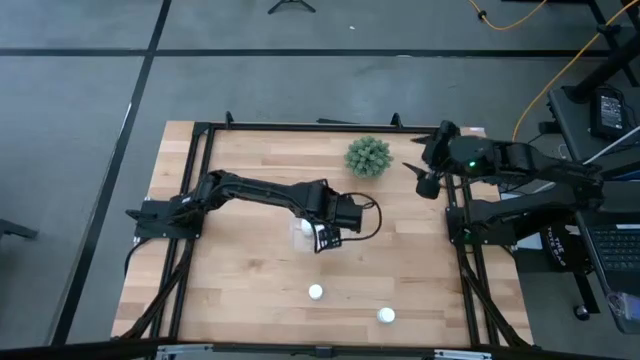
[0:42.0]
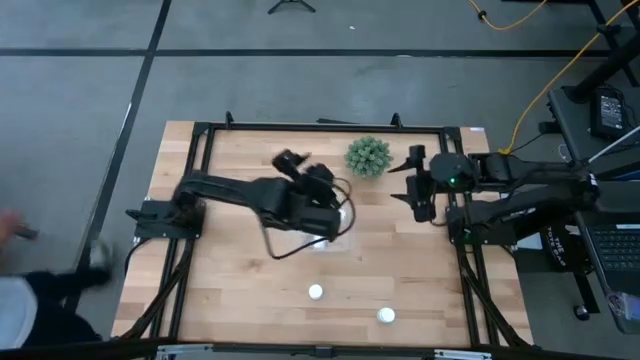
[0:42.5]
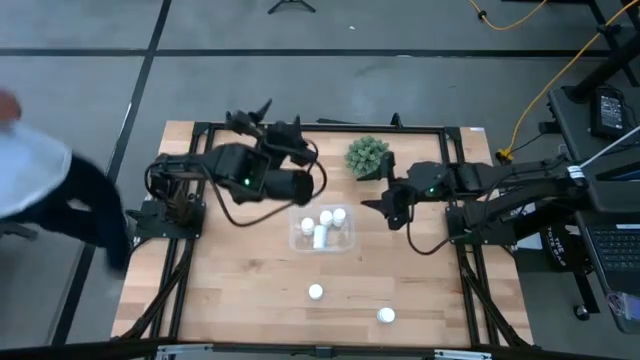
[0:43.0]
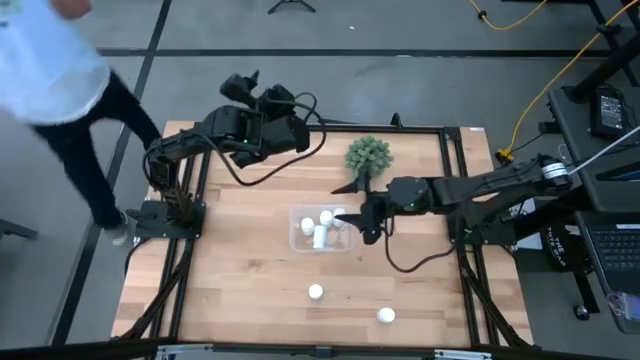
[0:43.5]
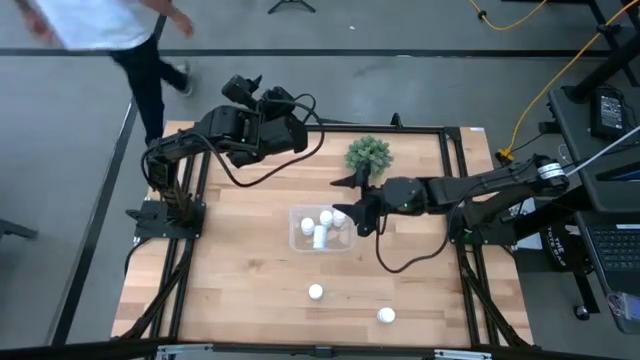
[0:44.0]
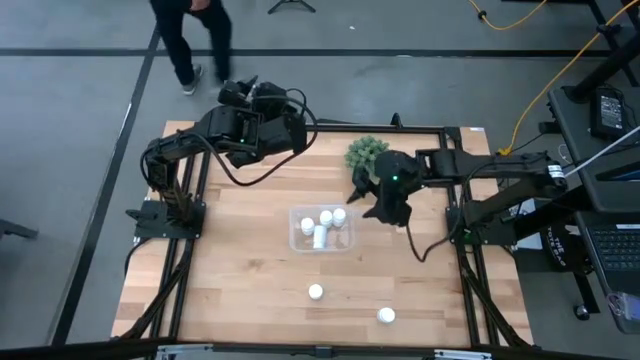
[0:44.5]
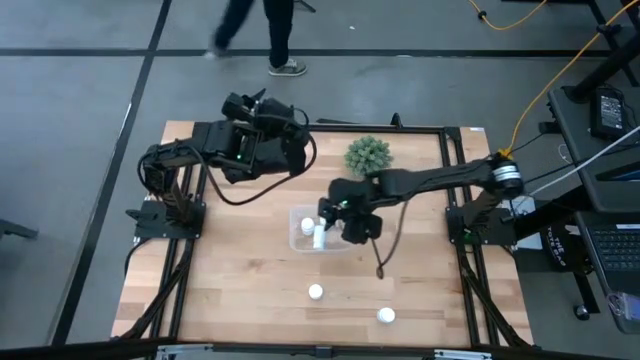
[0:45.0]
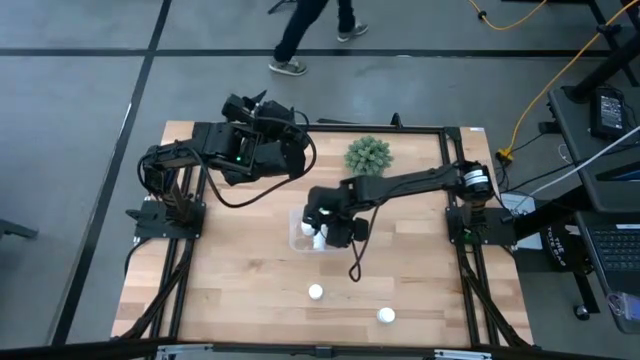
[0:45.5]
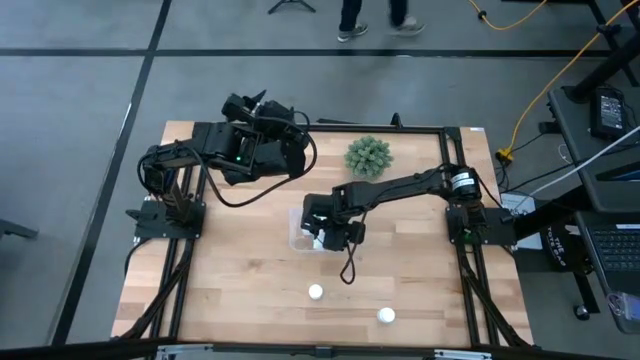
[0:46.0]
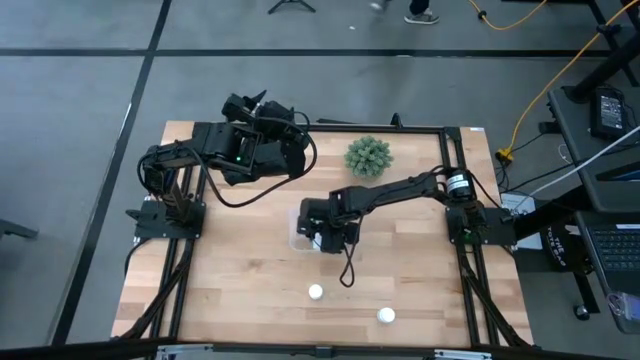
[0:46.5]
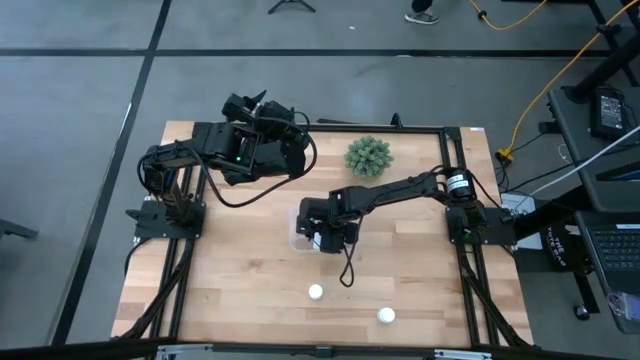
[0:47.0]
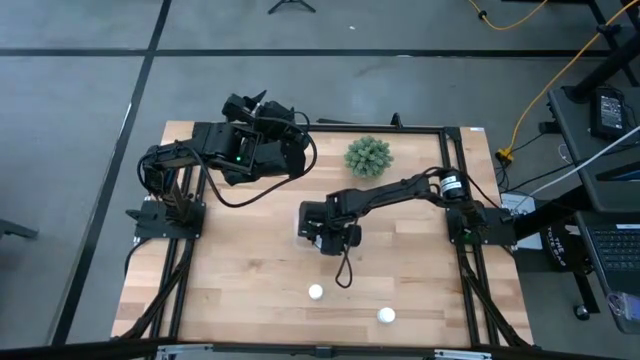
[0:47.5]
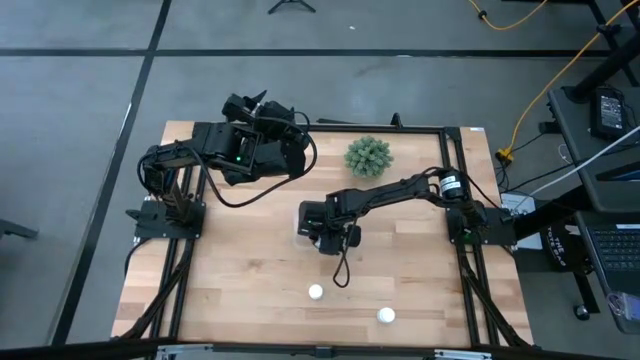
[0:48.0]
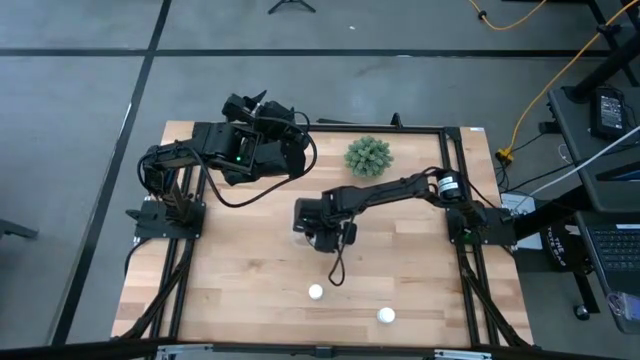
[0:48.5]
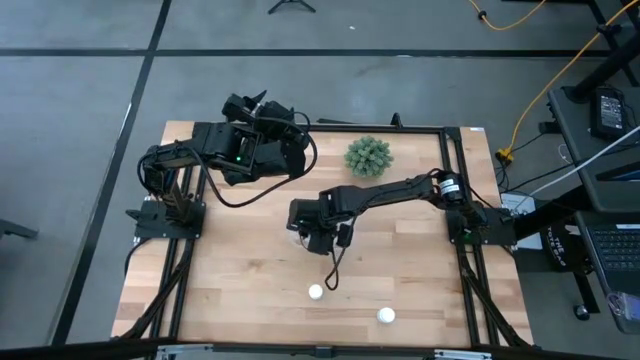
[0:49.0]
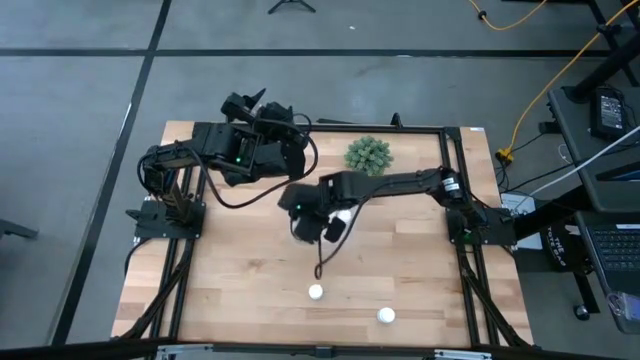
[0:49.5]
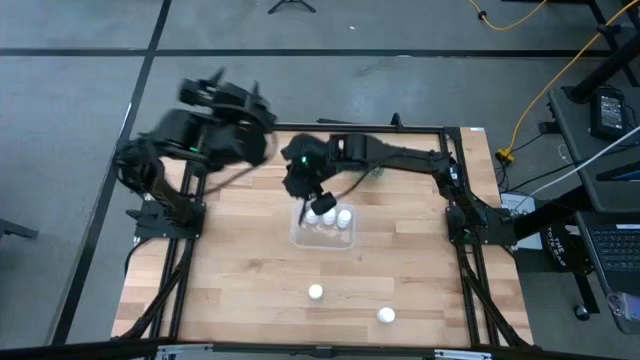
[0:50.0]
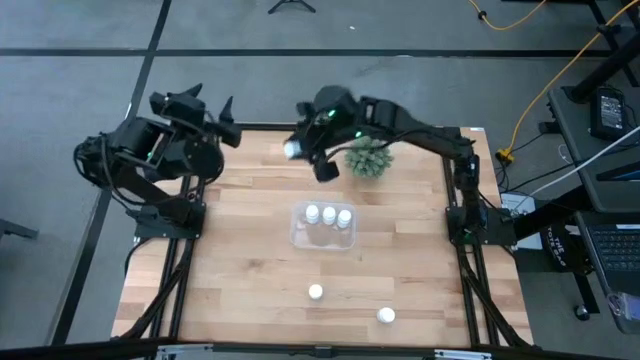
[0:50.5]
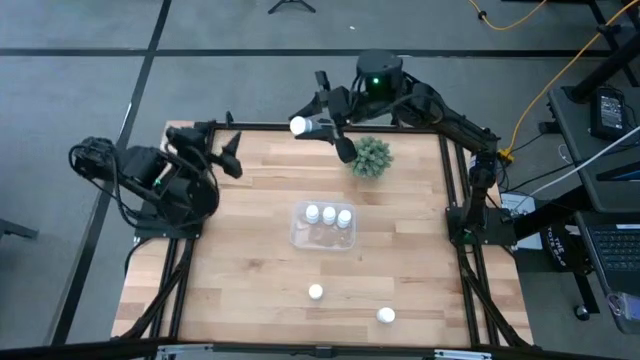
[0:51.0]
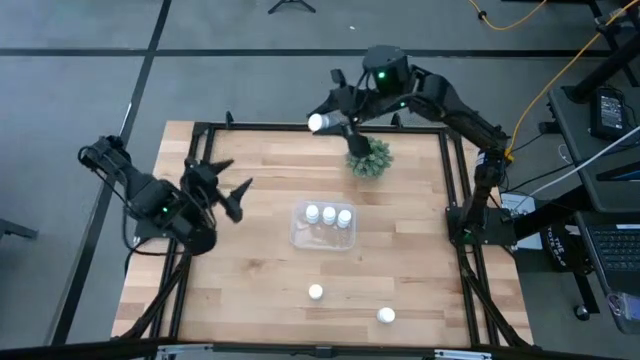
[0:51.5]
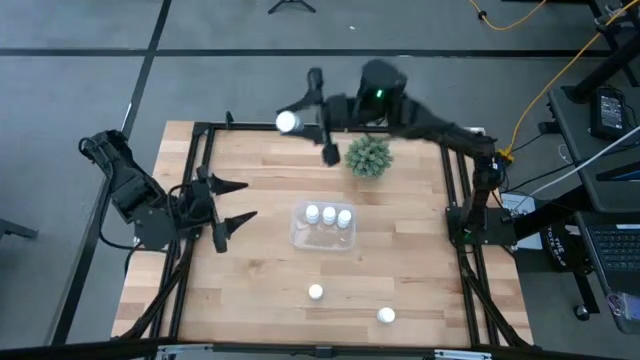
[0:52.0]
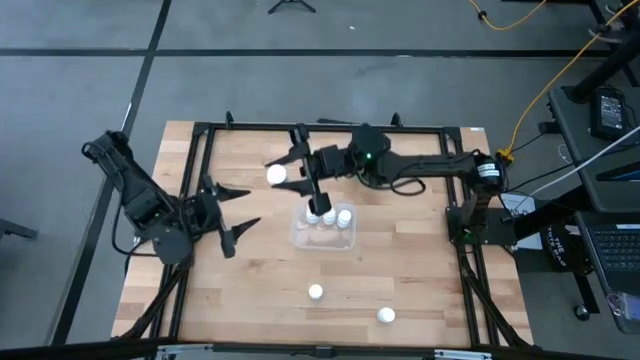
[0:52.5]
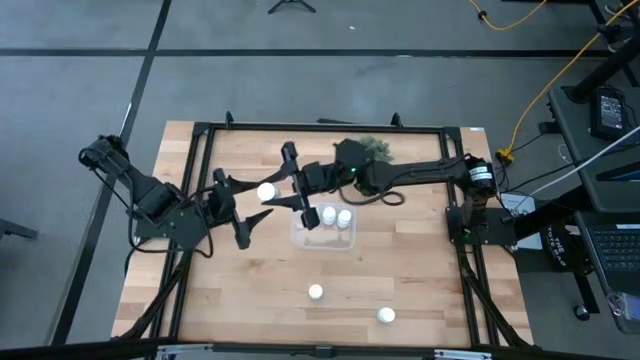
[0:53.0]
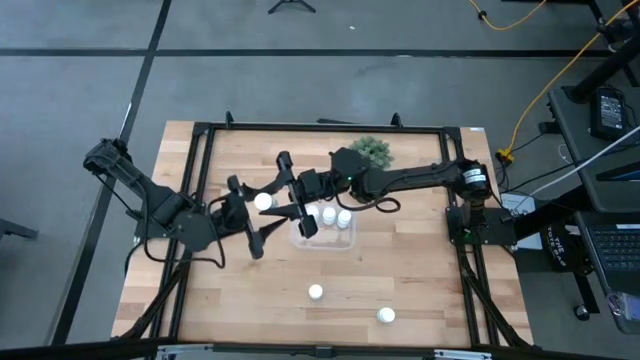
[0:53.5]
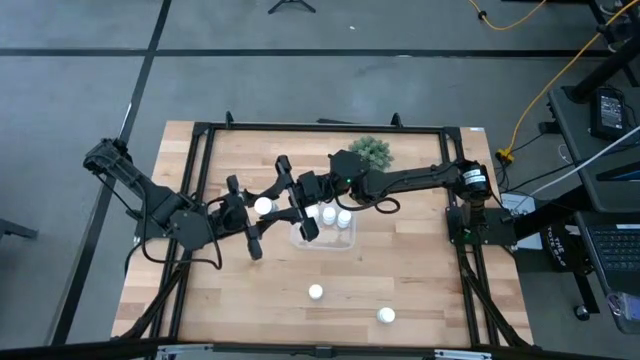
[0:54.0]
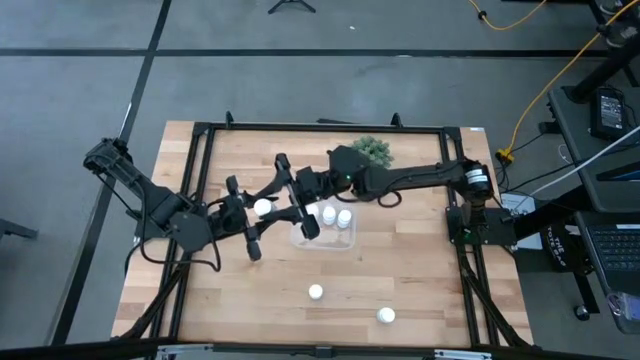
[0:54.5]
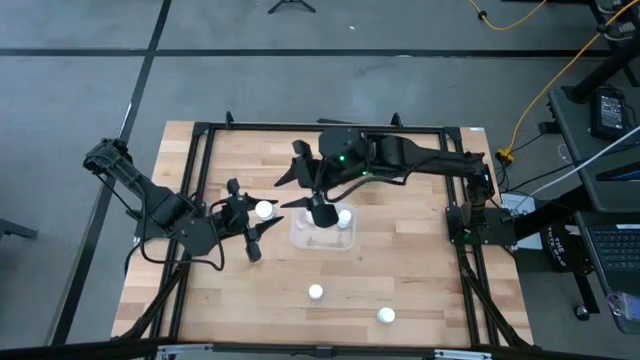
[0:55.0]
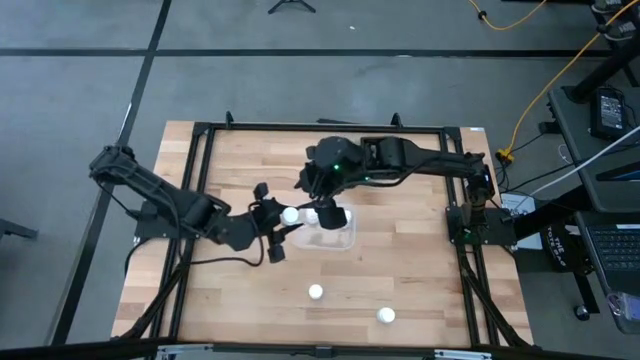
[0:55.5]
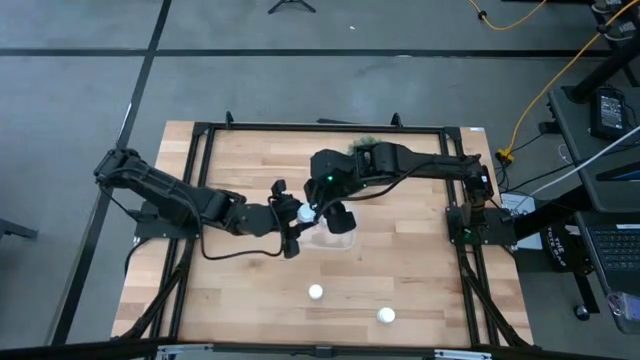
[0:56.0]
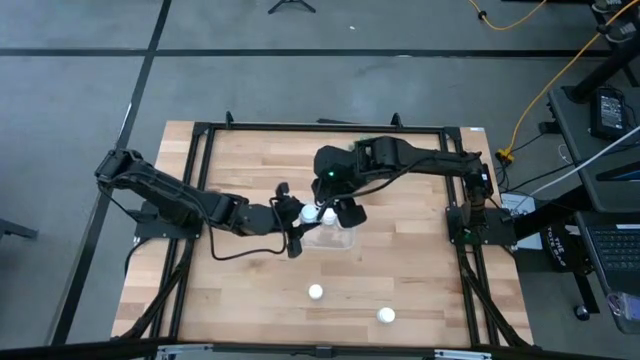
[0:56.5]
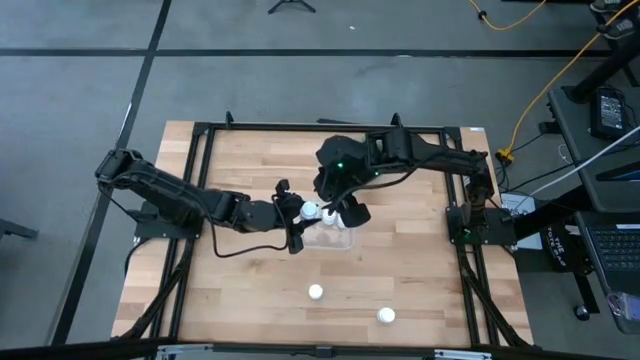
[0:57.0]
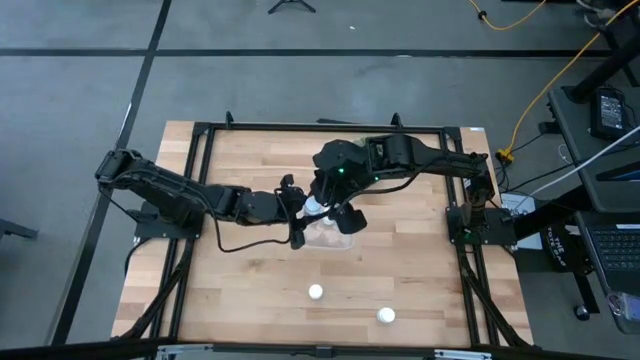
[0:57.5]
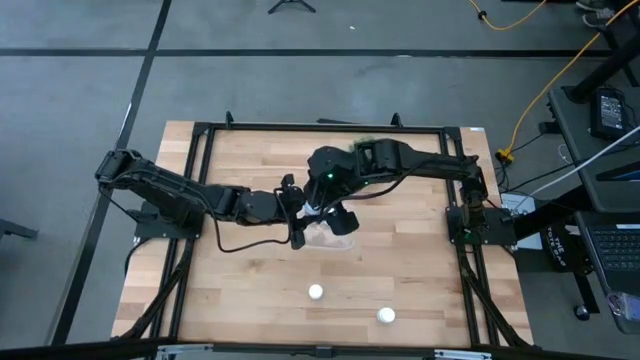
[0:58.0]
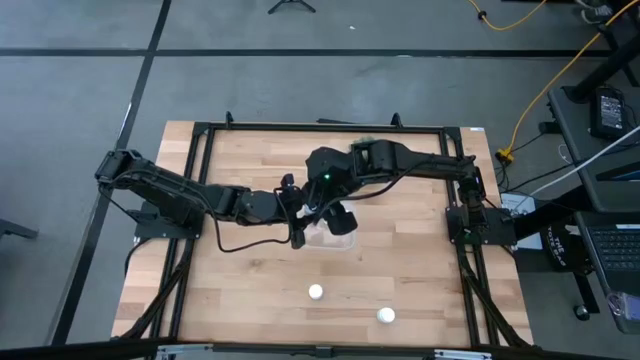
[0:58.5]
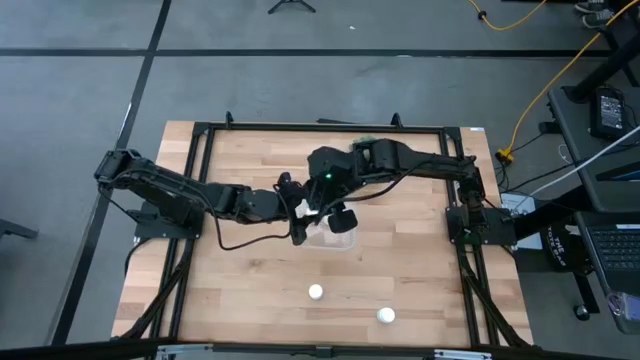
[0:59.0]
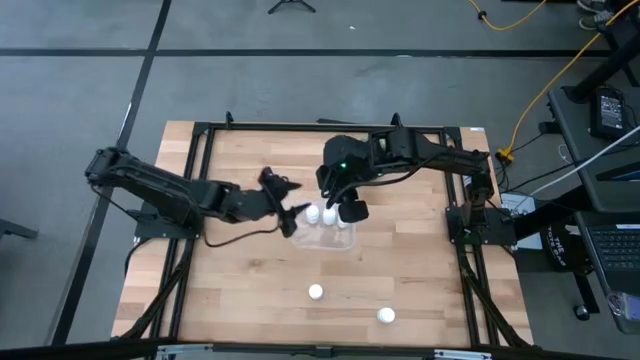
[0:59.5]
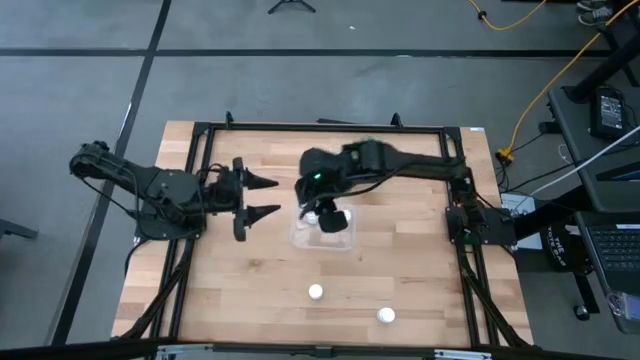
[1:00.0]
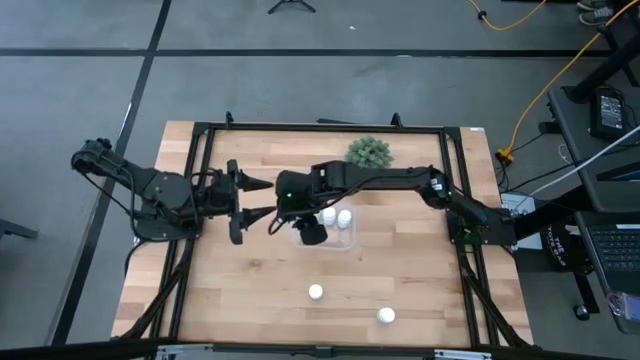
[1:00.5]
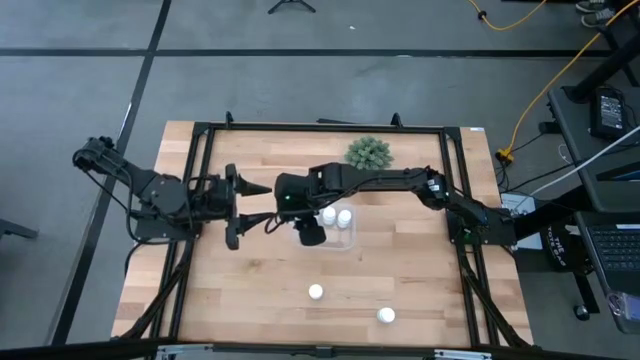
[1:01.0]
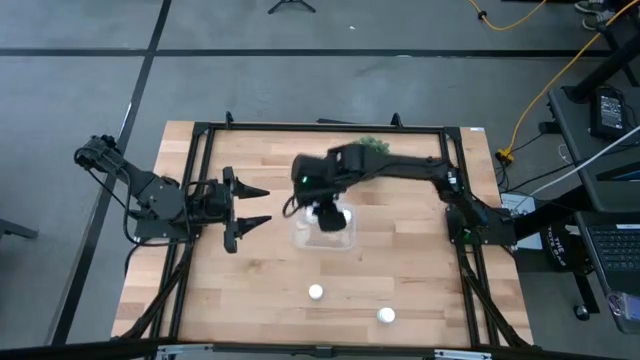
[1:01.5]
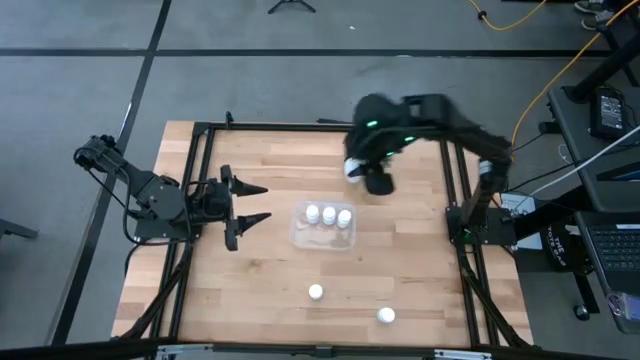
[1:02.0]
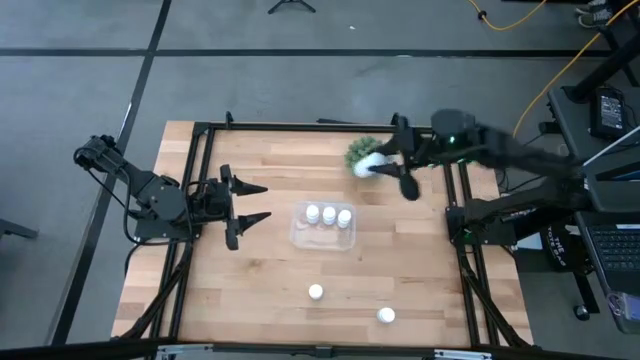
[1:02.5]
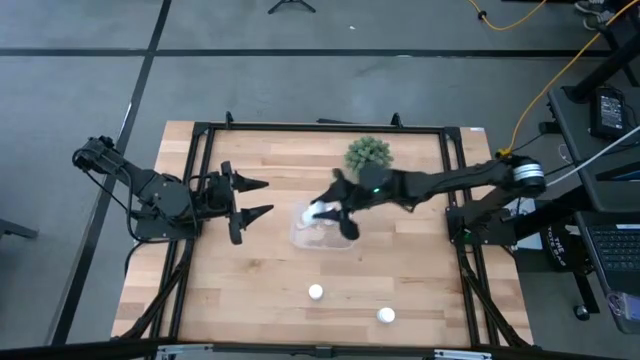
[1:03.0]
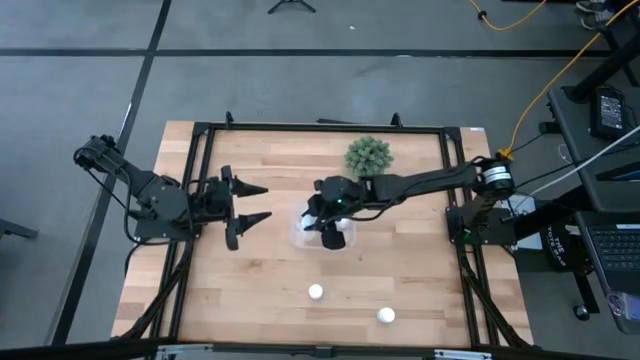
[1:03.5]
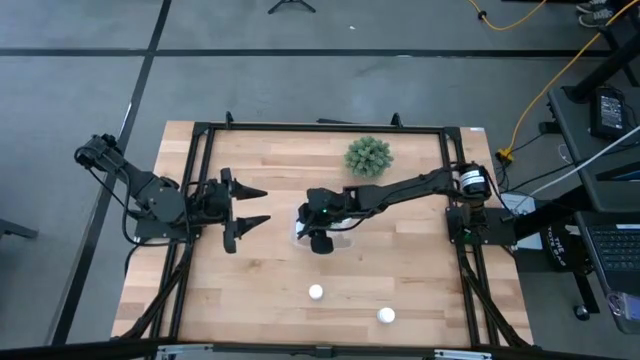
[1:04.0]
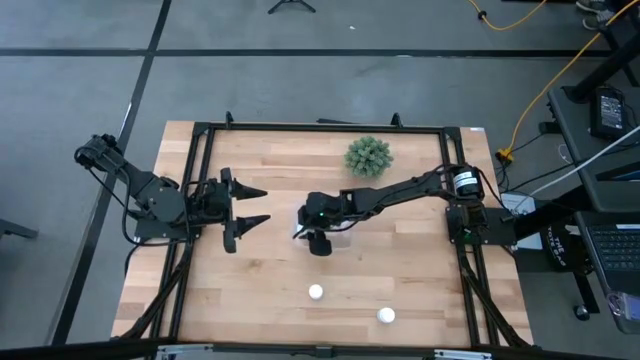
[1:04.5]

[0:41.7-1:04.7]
Task: Pick and place pill bottles into a basket
Adjust the white pill bottle in the bin
